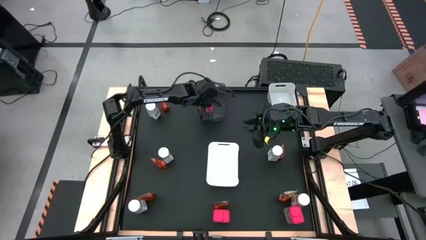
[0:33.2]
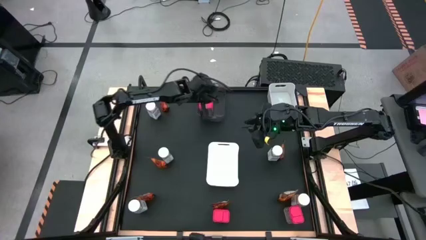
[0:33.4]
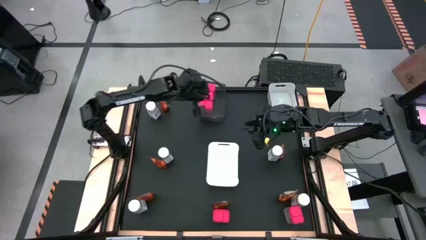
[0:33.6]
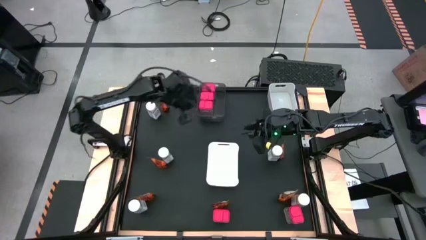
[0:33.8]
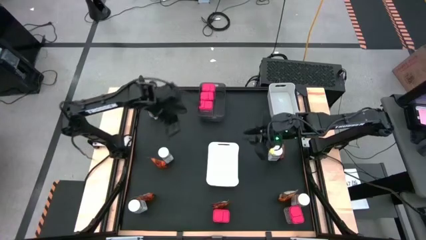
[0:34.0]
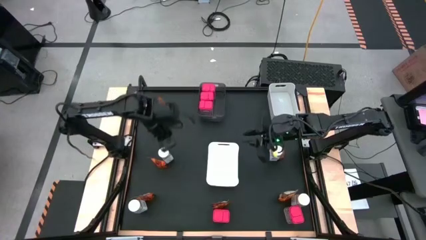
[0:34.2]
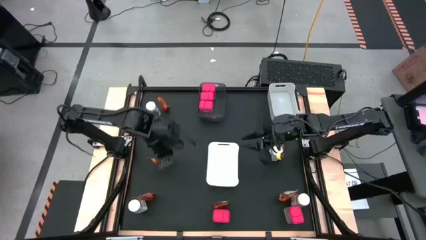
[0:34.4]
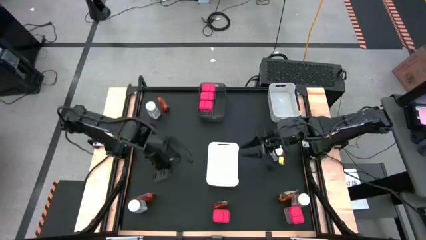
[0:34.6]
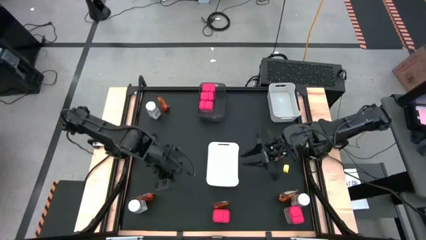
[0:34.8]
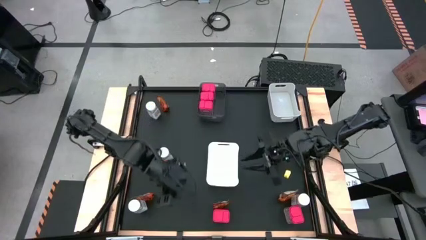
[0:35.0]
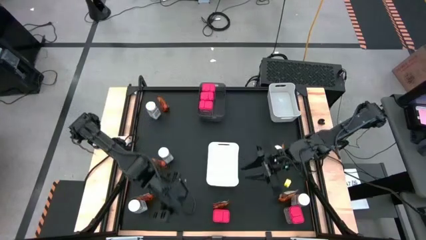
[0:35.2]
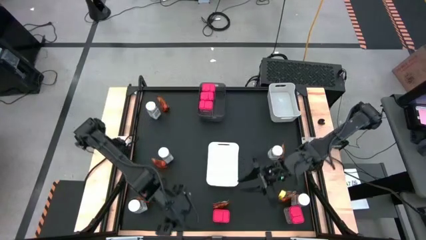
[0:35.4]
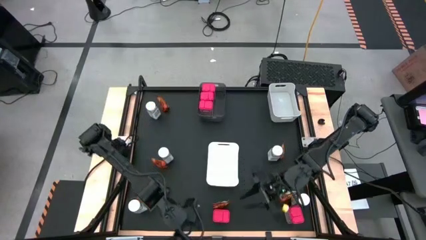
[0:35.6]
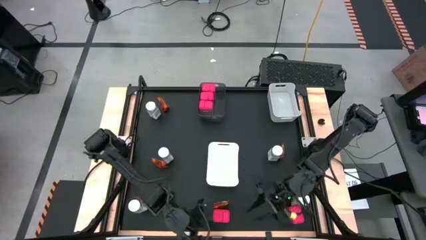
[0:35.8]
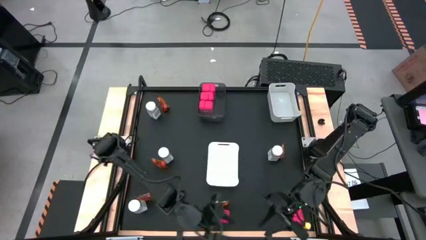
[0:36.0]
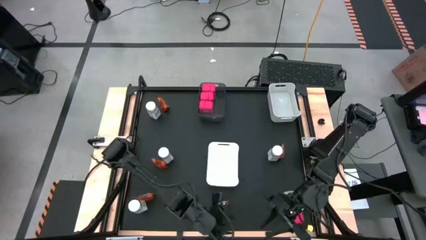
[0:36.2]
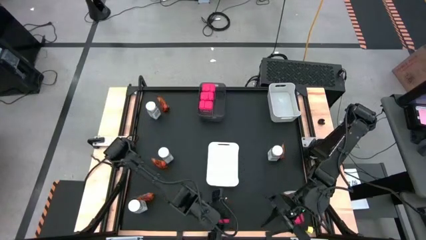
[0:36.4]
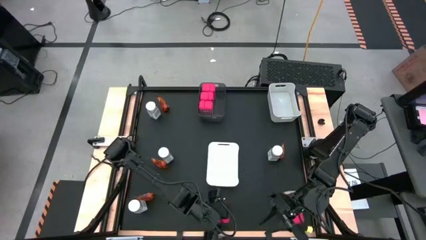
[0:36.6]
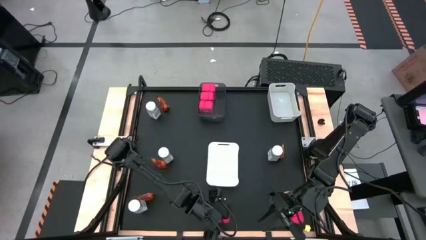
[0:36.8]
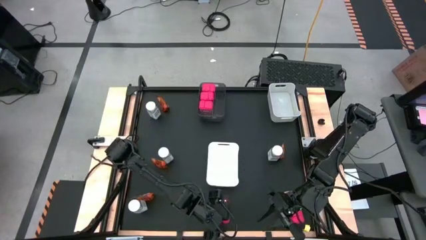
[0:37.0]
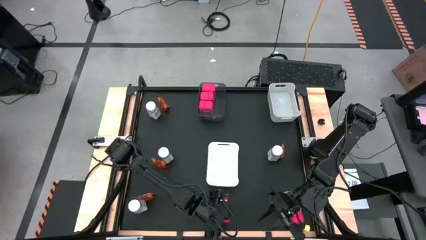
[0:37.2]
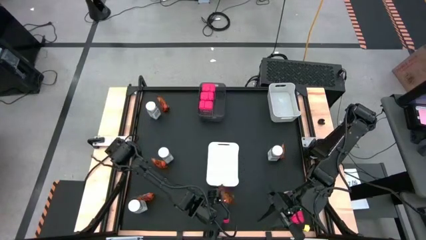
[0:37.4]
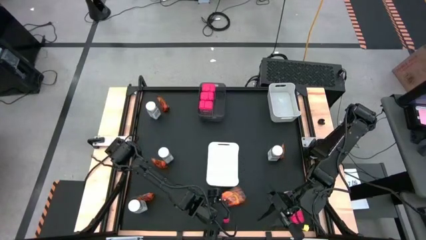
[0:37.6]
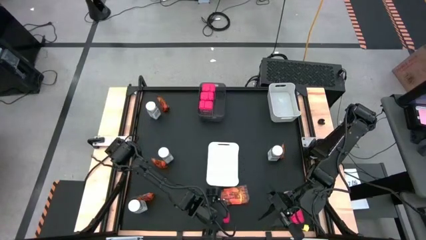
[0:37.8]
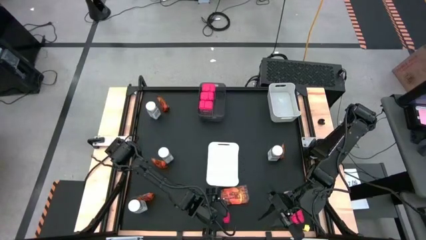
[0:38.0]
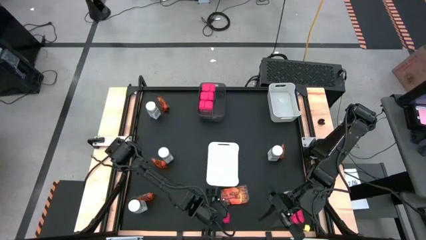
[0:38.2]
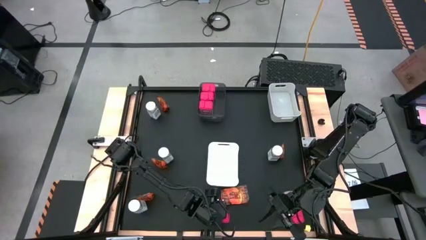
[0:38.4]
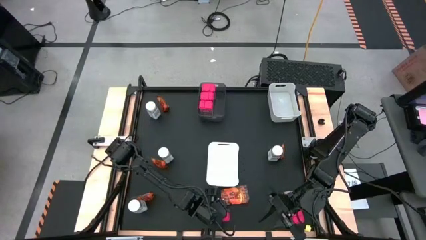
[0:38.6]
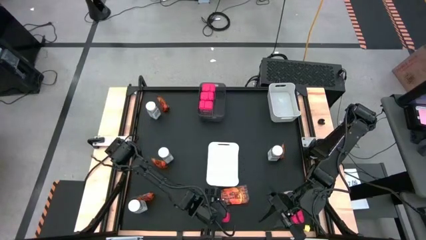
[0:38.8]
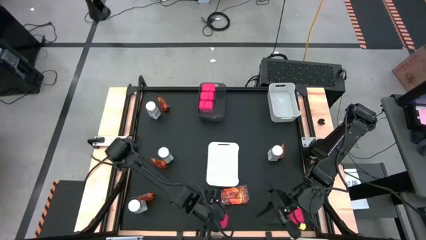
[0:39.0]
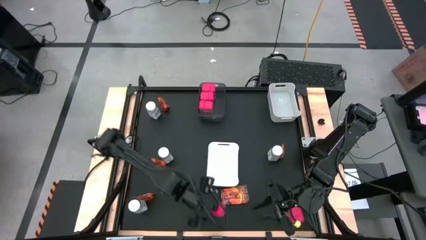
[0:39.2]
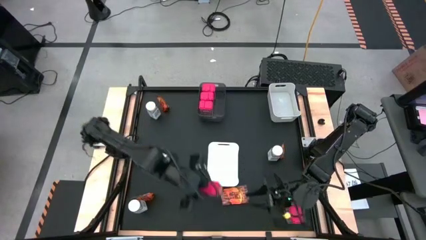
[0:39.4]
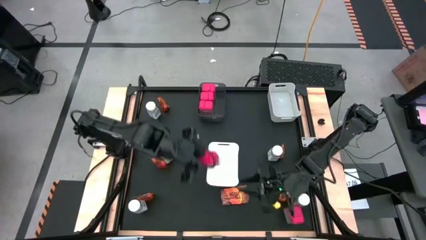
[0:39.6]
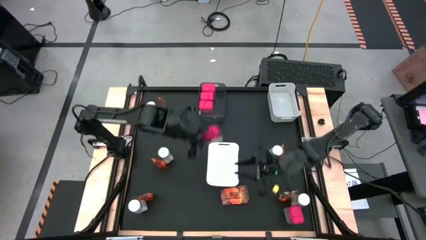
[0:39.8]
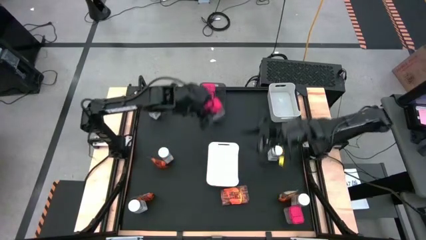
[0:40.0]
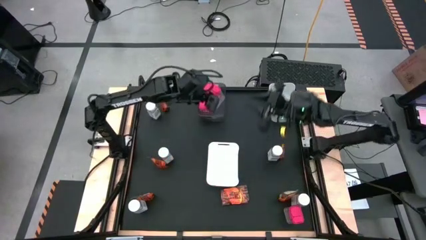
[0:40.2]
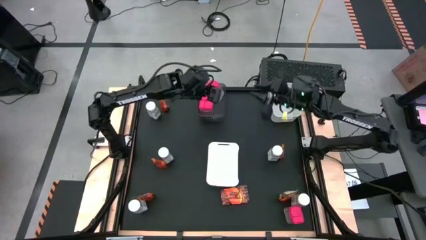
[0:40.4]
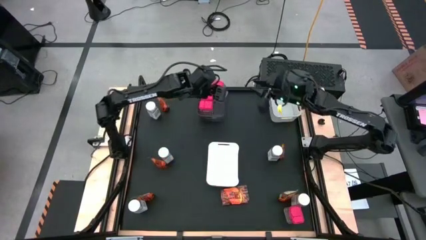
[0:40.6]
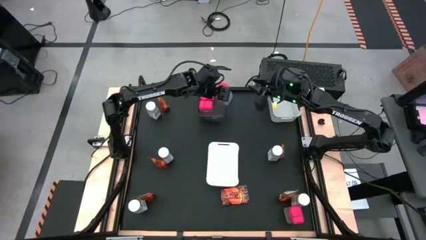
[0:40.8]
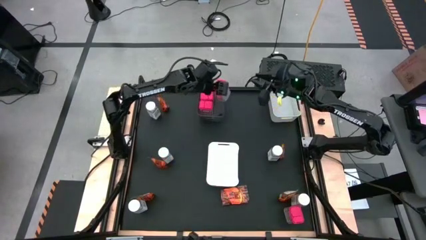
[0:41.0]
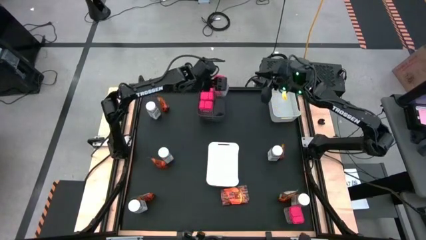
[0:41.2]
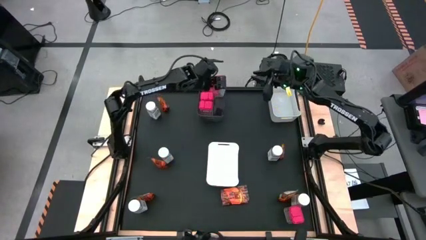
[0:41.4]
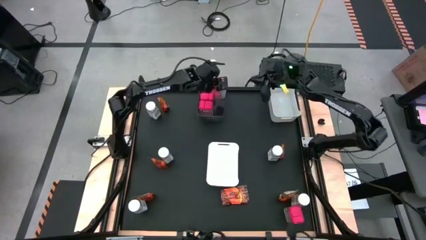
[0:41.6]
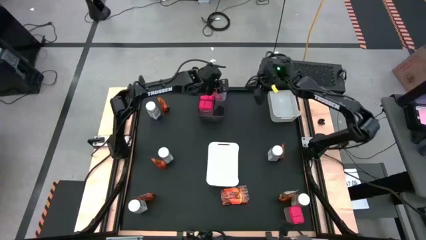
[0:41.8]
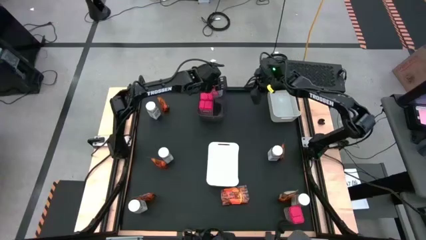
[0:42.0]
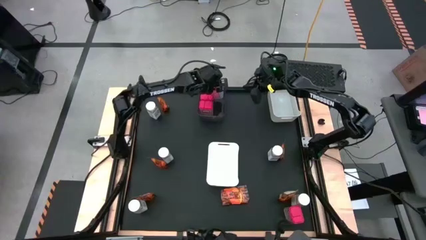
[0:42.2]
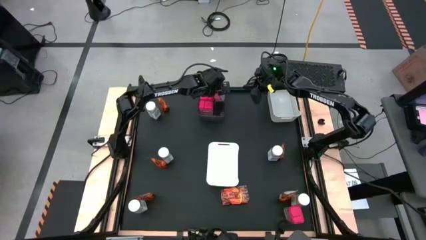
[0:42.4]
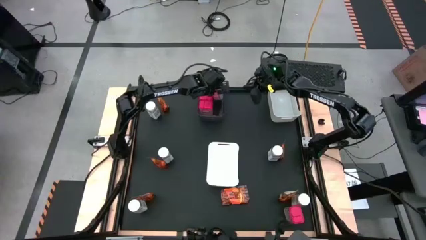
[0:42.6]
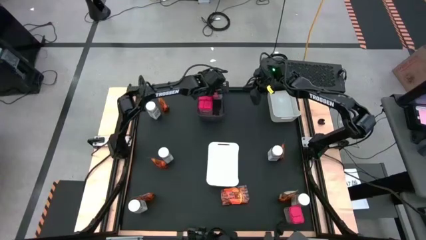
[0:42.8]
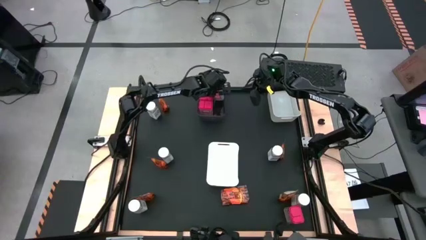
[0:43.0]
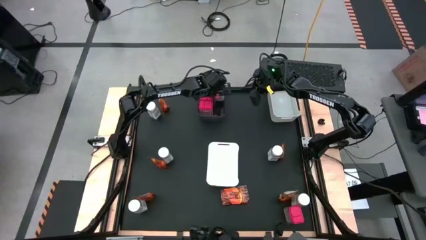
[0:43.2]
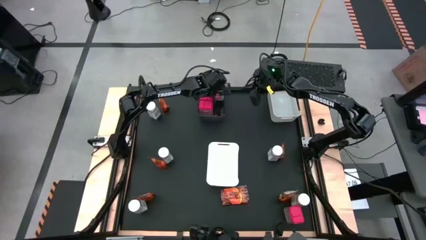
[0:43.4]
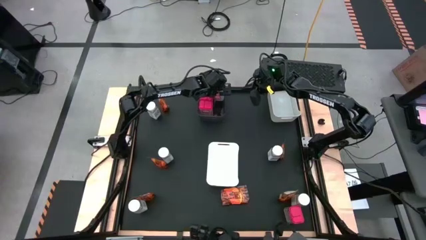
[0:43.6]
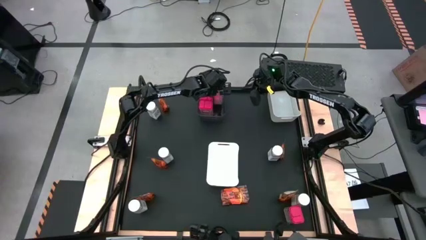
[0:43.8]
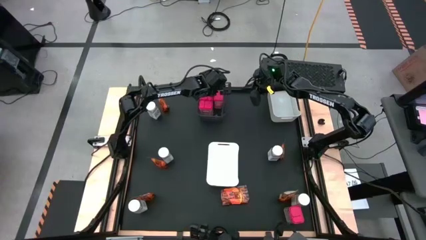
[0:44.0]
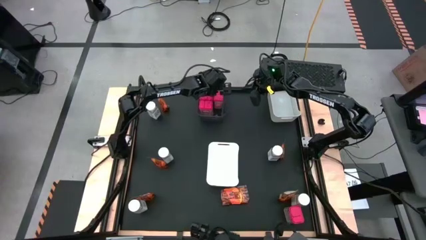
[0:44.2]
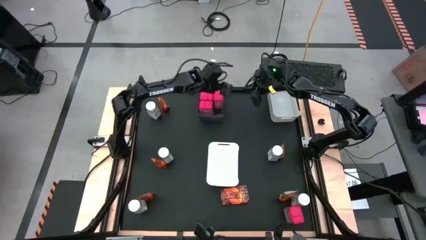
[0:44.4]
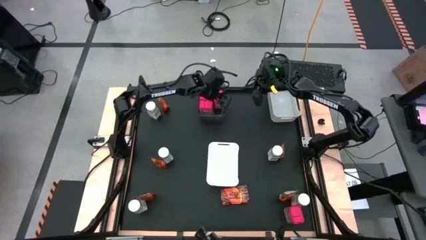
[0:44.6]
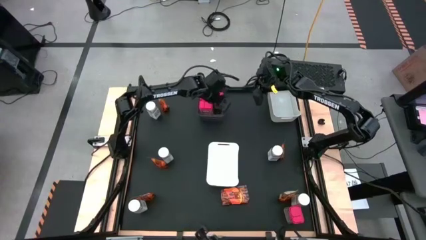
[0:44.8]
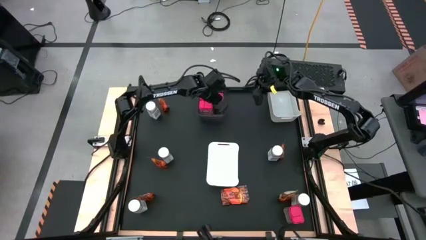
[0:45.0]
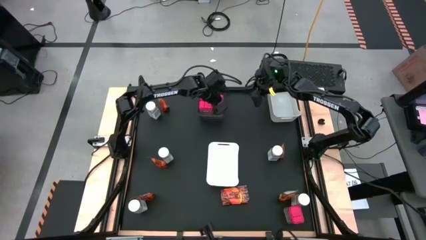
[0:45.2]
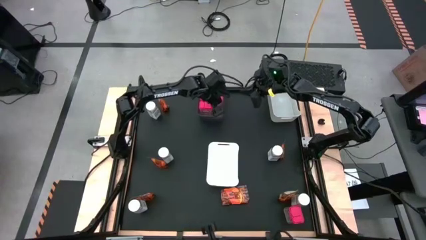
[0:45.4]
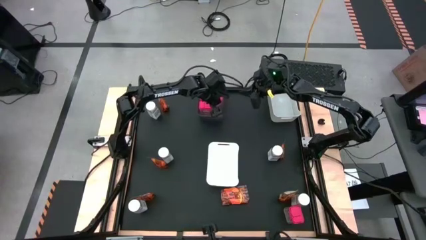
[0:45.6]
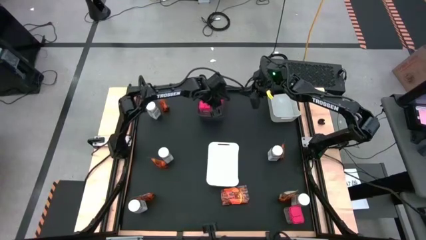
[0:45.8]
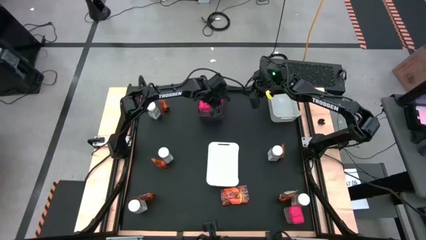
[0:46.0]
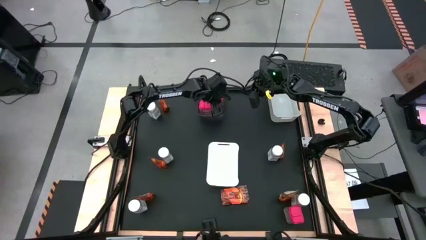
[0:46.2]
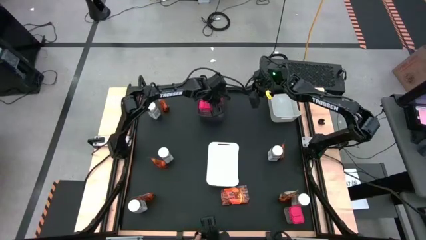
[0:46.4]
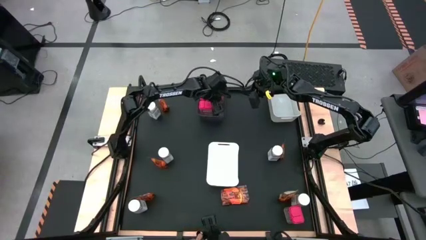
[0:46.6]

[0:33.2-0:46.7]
Task: Sort spices by type
Put the red seasoning can into the black bin

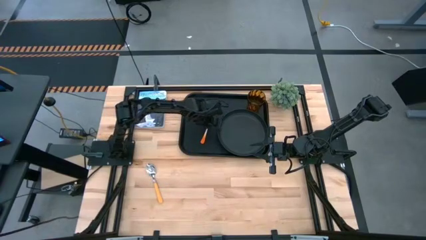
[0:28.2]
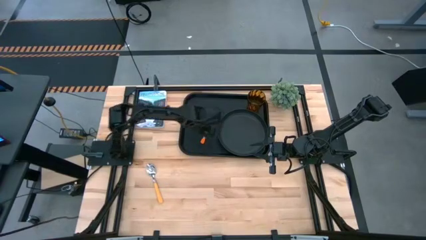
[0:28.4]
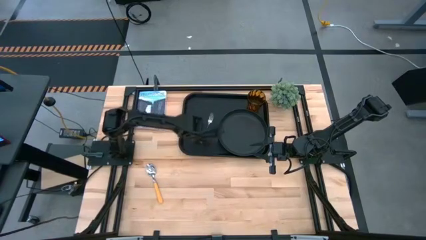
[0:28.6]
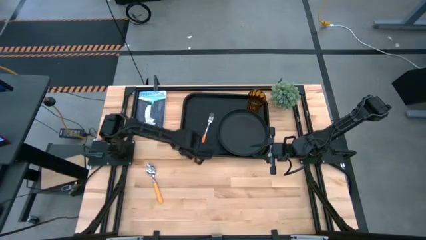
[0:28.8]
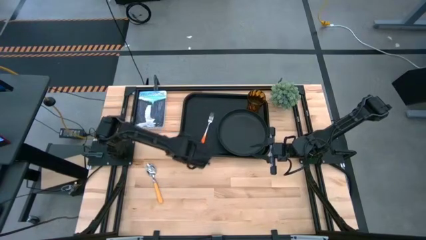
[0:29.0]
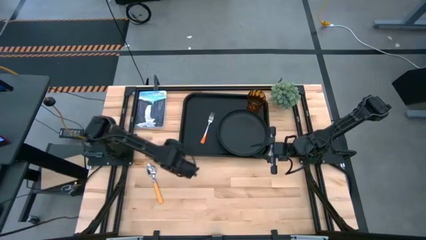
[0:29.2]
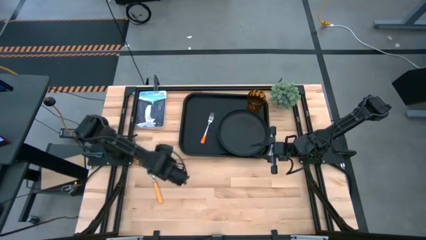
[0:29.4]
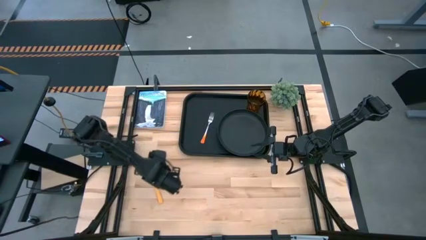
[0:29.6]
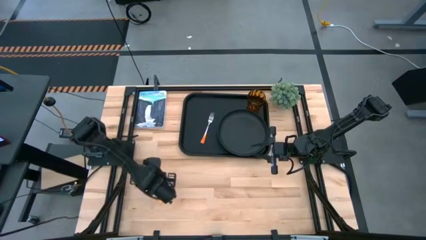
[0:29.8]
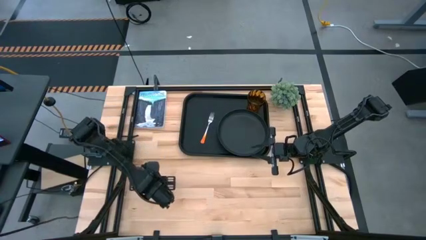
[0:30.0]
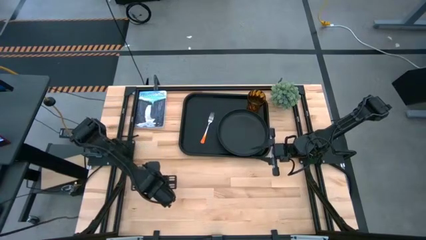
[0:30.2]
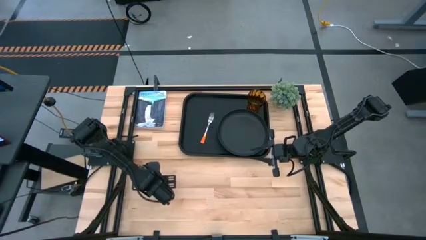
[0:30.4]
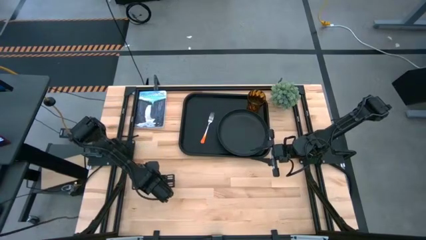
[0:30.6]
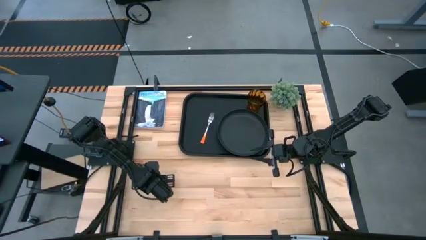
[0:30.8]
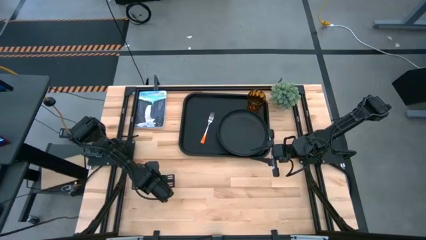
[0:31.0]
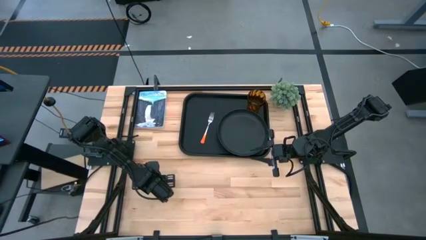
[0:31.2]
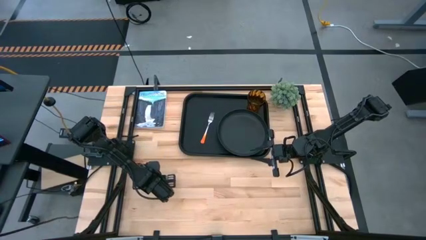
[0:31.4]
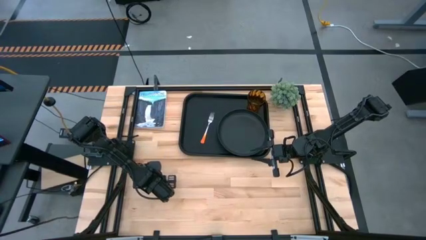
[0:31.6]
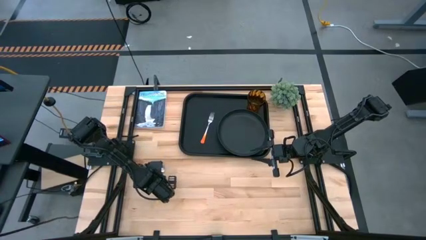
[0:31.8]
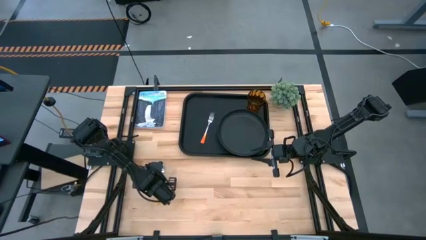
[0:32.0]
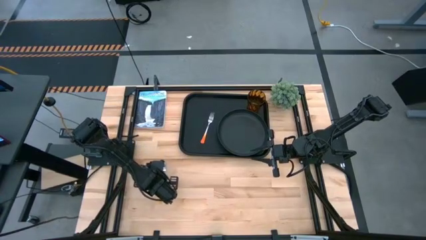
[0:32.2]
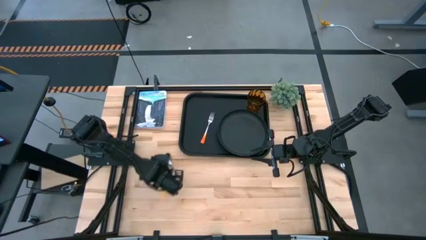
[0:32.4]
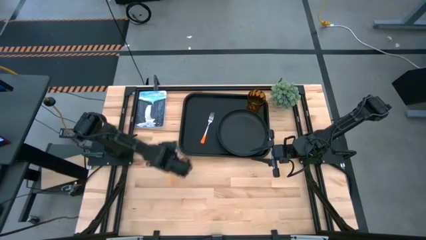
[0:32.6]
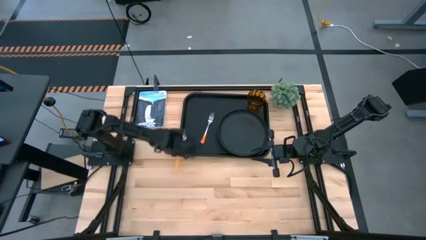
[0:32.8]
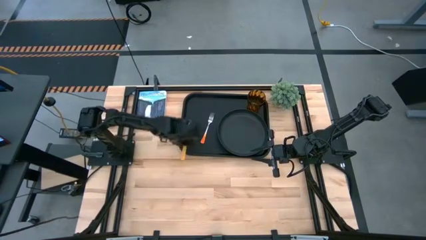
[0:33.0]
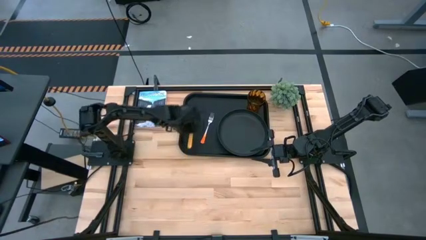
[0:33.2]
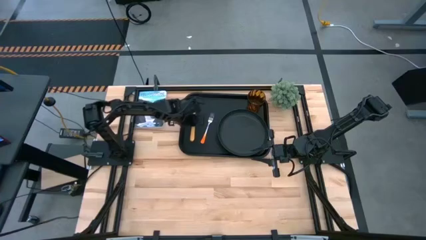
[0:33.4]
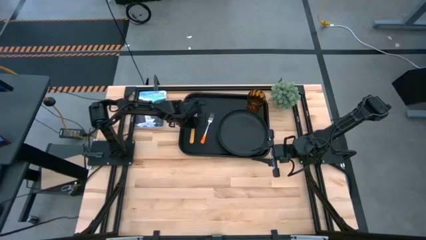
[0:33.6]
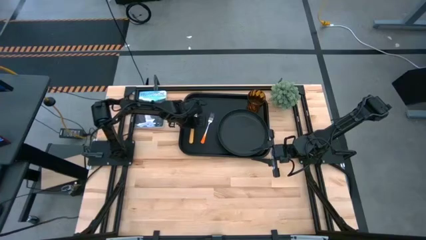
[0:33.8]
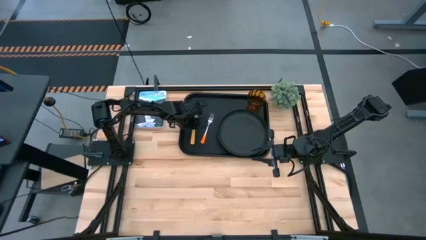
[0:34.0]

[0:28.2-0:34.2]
Task: Pick and place plate/cup/fork/spoon on tray
Put the yellow spoon on the black tray to the left of the orange fork
